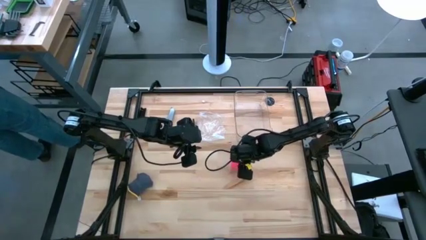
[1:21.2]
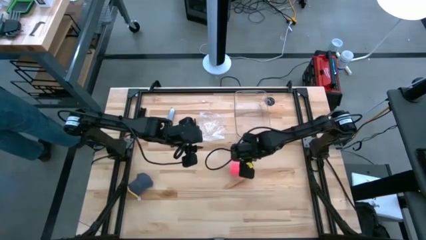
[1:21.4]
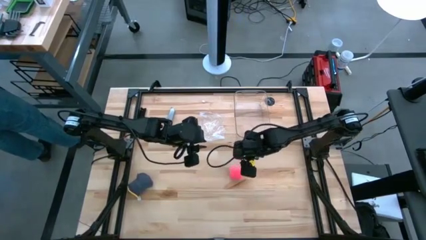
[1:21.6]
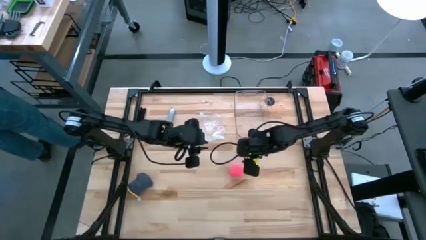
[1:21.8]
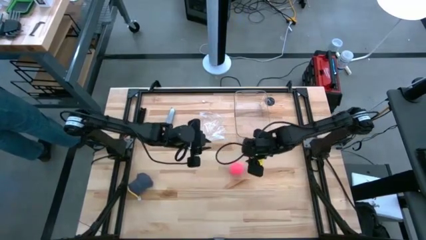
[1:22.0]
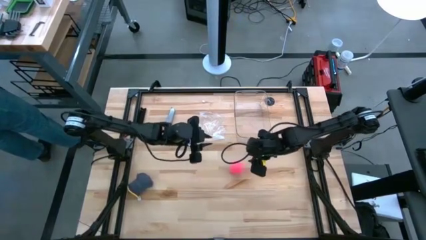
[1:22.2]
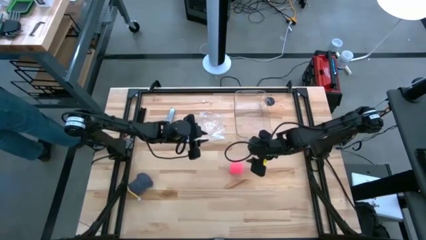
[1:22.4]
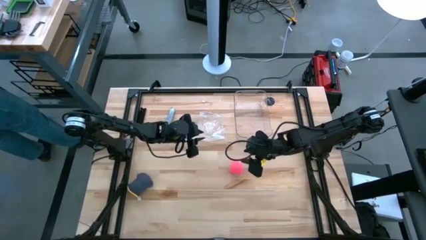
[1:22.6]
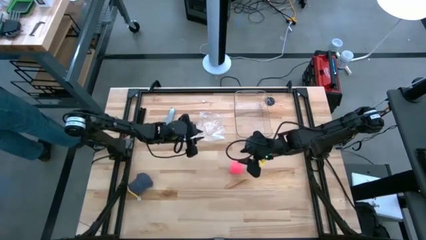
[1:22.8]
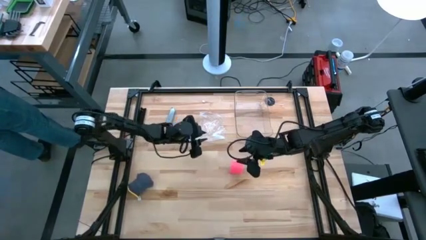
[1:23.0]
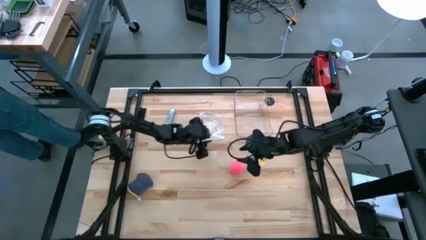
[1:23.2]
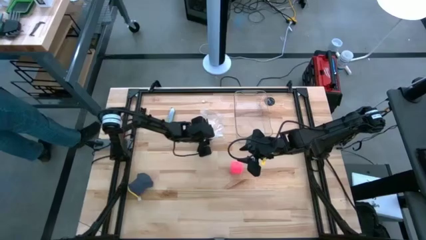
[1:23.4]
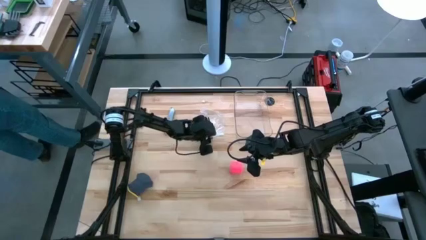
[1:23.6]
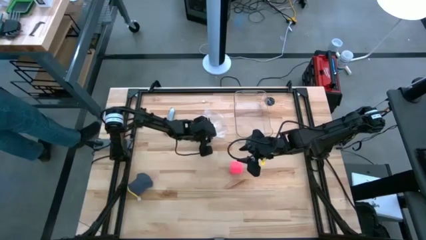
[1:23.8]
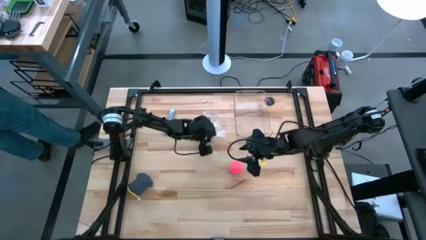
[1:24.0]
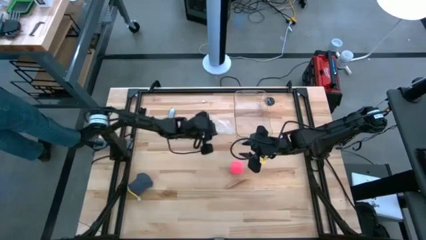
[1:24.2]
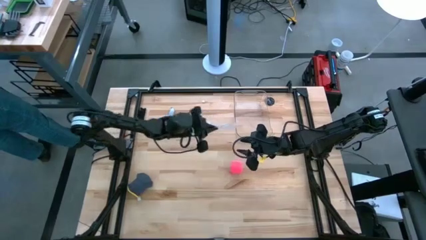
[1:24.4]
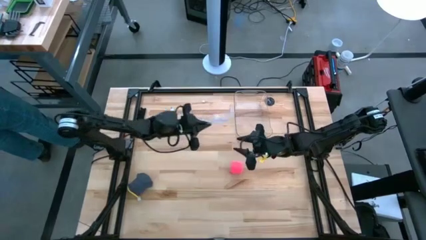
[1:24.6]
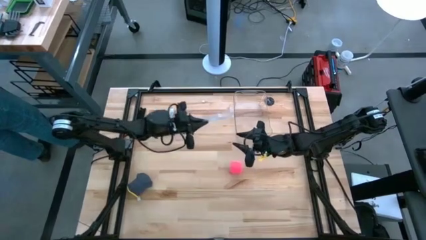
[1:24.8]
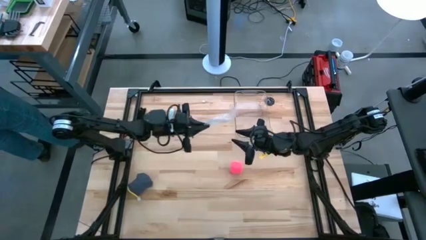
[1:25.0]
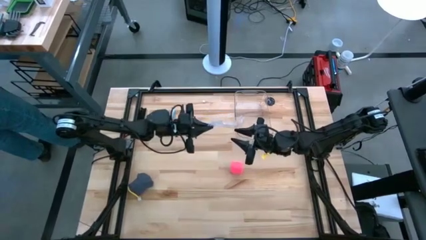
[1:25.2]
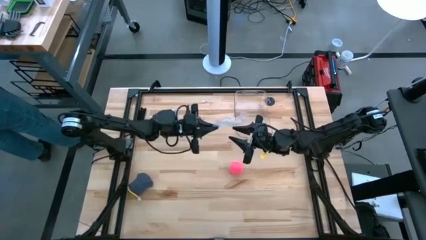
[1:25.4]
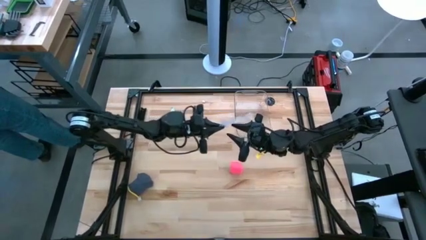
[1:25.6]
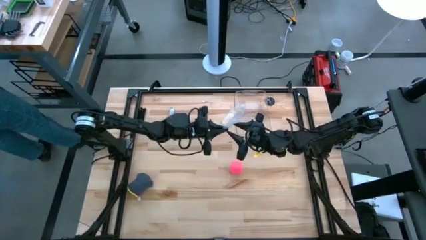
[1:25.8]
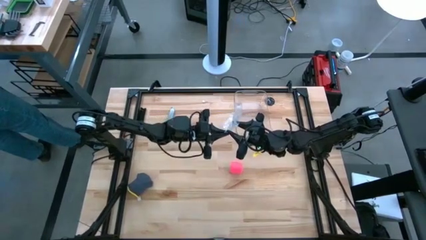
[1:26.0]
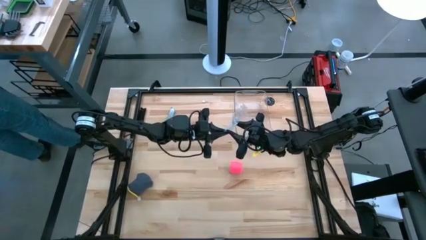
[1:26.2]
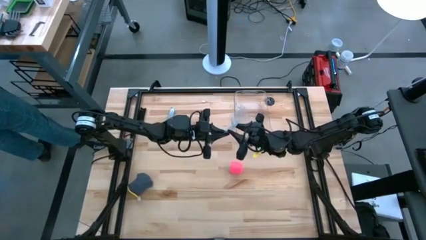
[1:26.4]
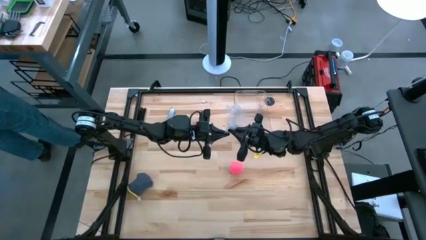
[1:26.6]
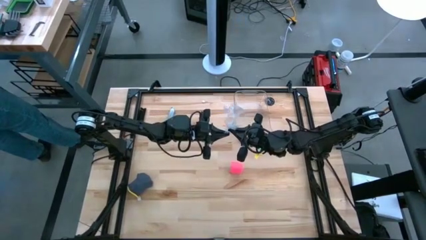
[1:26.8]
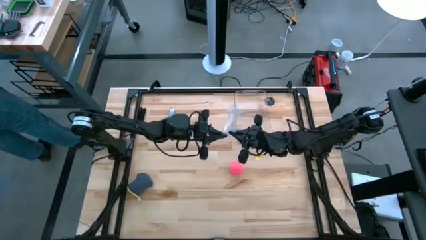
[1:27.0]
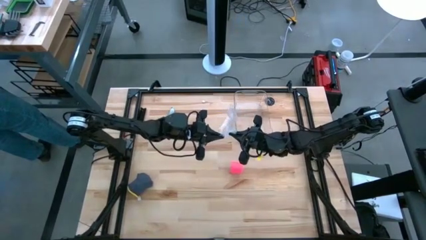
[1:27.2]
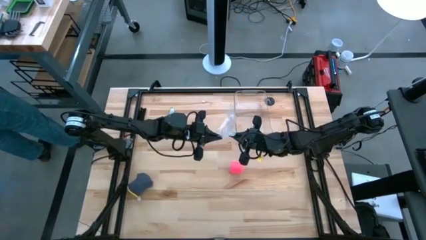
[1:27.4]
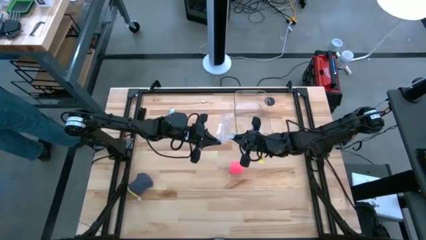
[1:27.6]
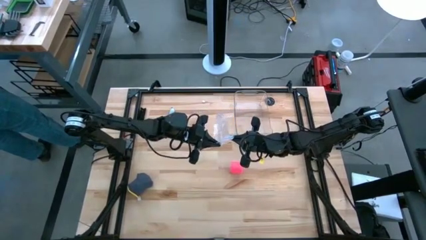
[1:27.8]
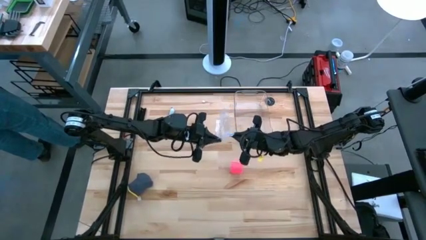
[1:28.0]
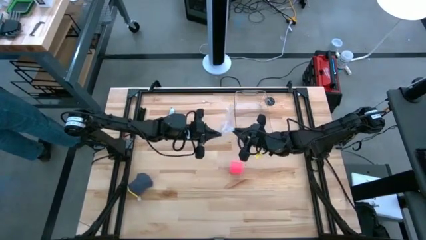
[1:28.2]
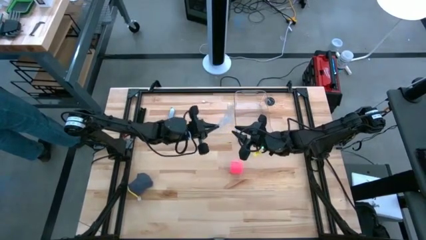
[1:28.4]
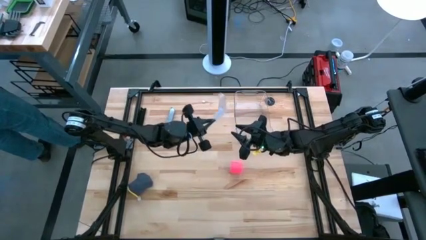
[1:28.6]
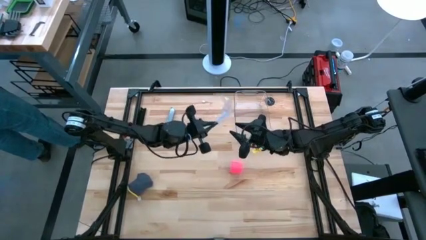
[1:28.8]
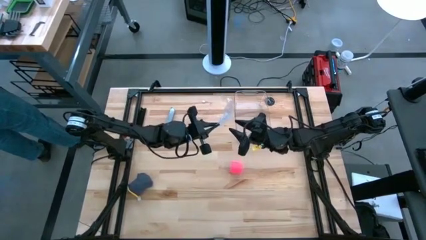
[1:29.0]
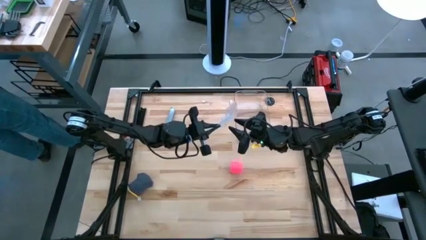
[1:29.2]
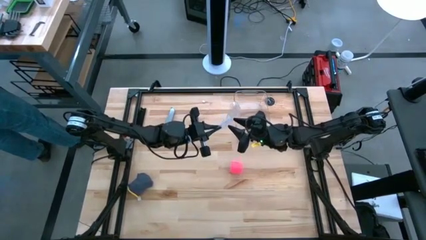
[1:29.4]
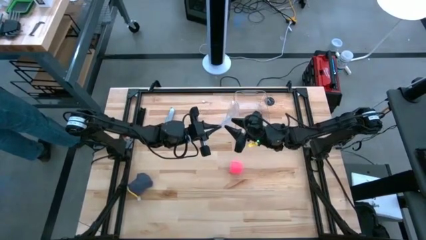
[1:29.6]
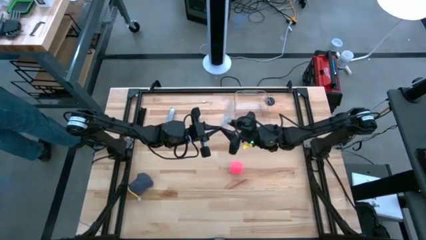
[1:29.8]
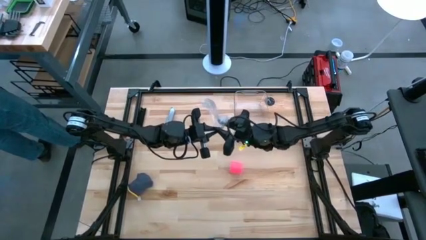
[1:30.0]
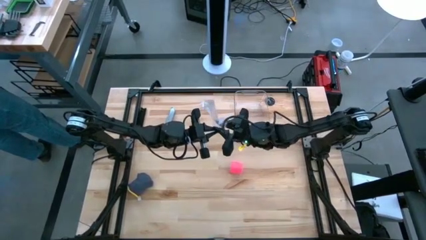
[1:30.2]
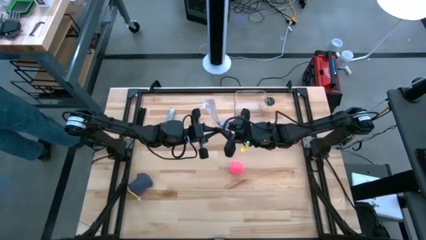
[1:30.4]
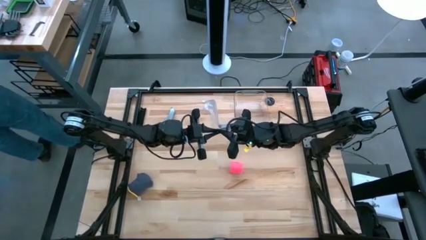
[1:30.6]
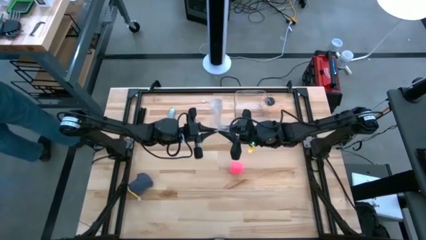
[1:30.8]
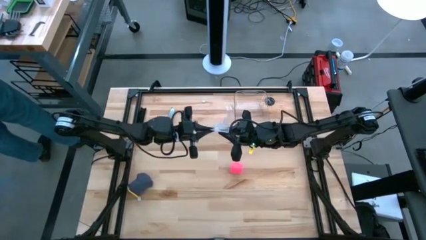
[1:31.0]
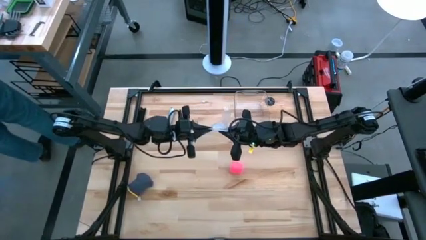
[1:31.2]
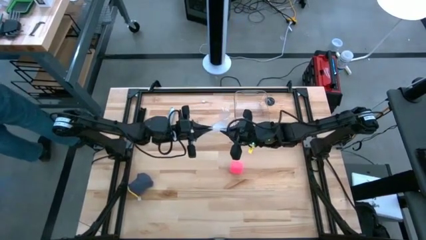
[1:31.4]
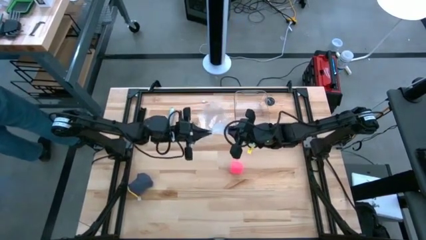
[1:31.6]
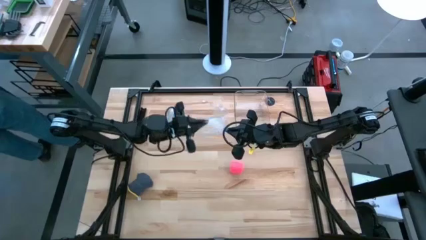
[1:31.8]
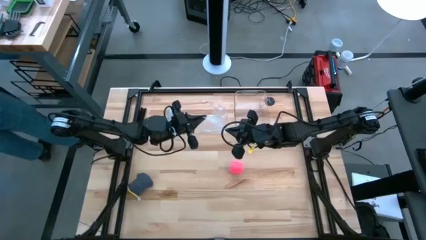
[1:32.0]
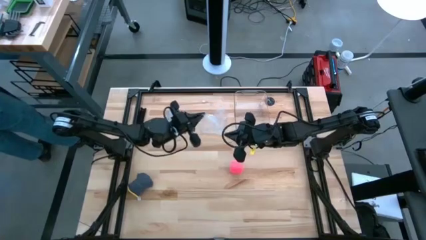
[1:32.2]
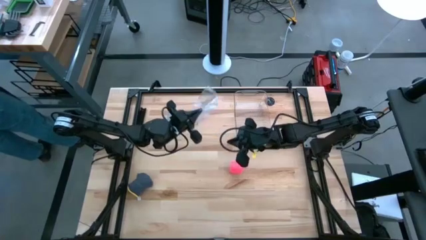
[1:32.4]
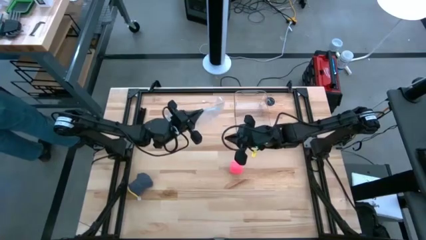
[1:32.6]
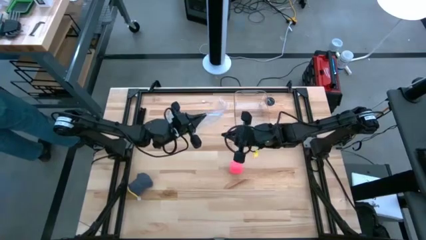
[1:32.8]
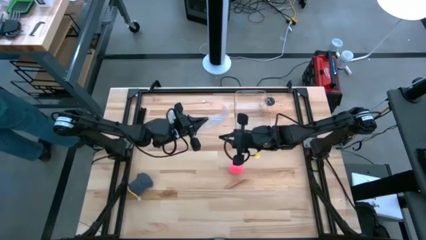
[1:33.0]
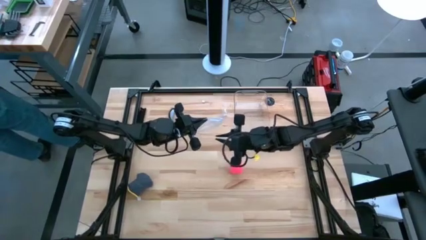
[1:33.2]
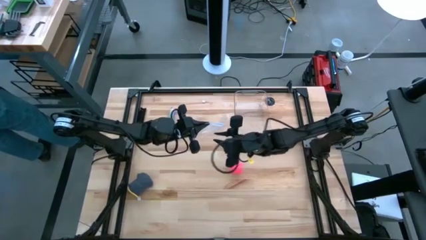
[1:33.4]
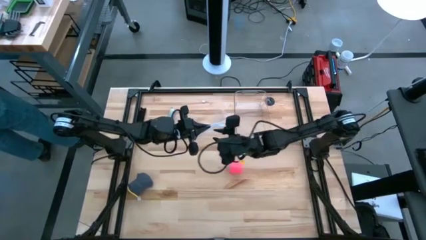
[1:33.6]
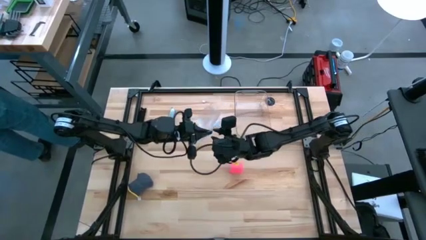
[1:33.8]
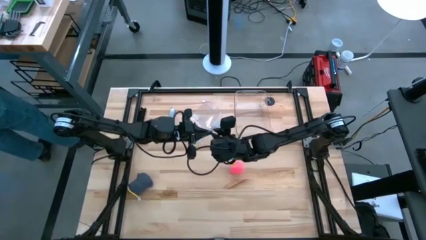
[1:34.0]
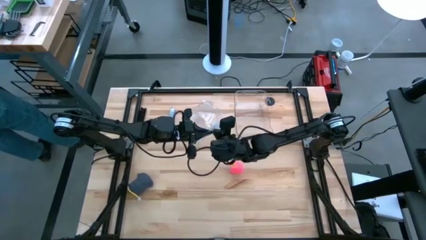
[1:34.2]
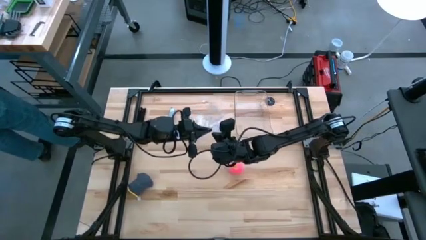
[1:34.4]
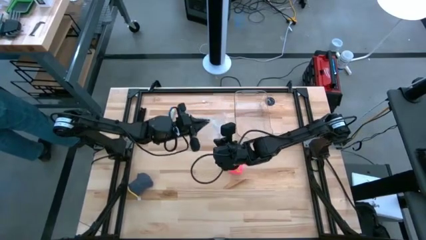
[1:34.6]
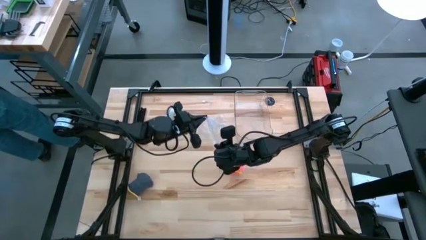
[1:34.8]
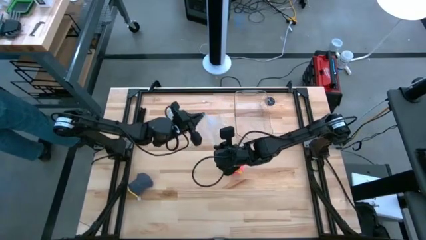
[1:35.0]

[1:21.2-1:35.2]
Task: Roll bandage
Prepare the transparent zip bag

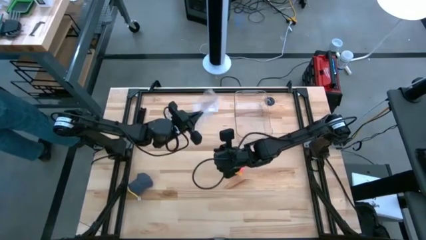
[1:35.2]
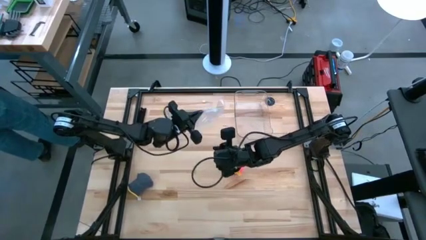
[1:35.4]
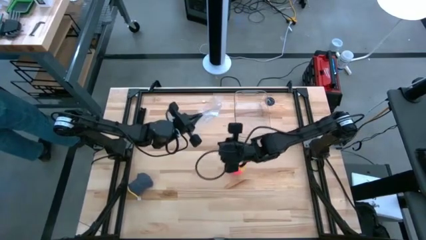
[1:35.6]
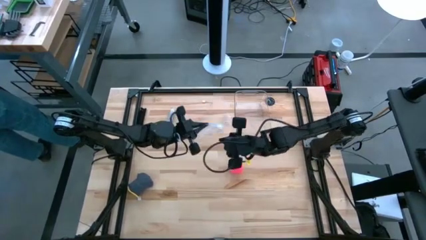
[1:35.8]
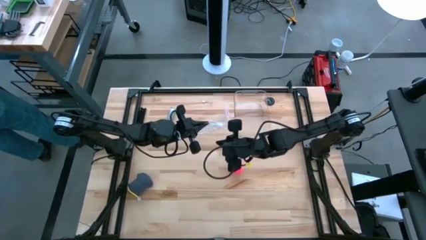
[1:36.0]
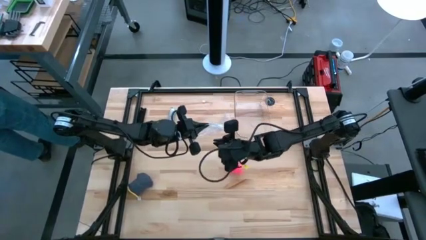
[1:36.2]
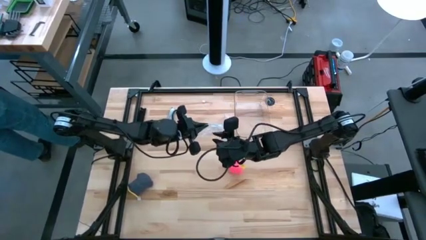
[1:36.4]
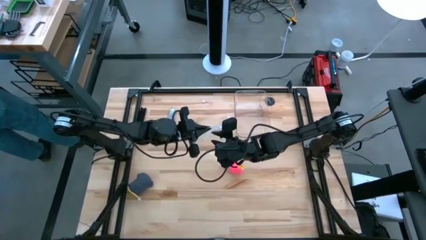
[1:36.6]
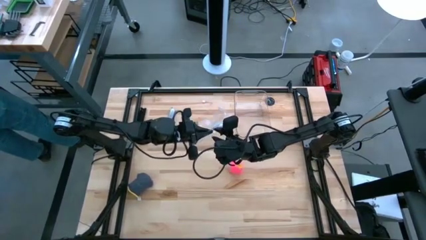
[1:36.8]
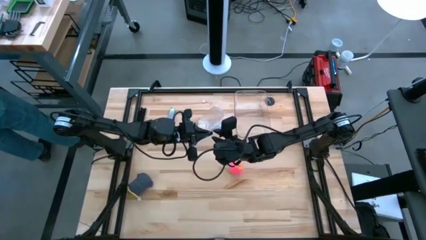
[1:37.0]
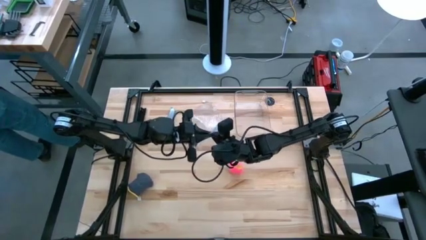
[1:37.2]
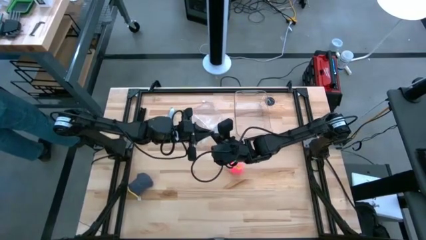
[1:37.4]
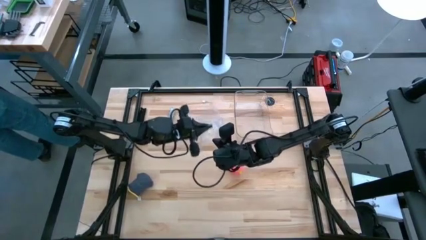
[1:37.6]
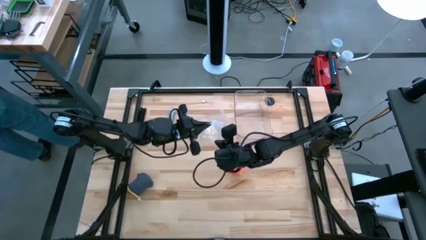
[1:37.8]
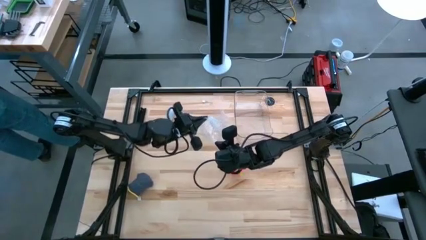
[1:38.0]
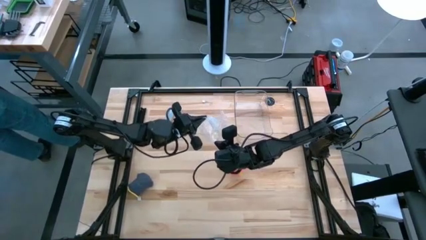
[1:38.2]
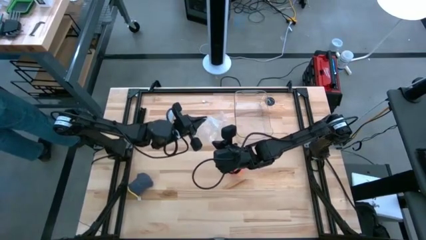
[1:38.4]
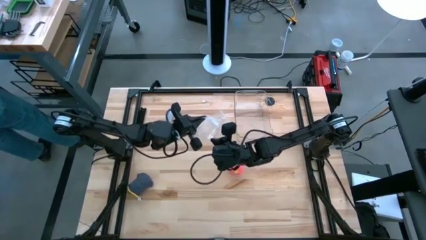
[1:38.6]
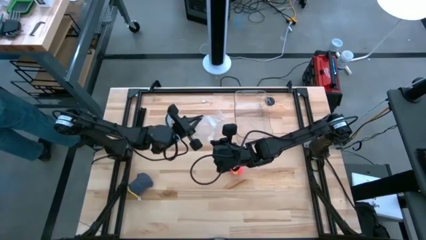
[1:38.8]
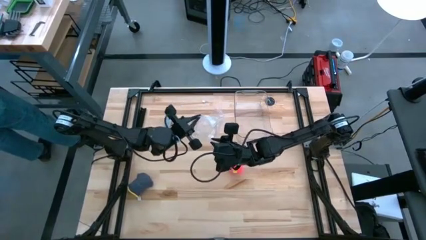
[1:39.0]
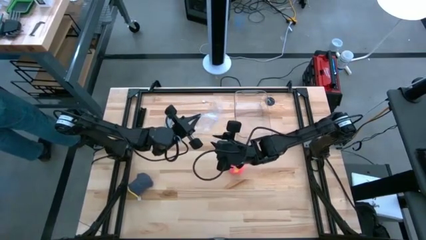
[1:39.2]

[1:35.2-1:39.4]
Prepare the transparent zip bag
